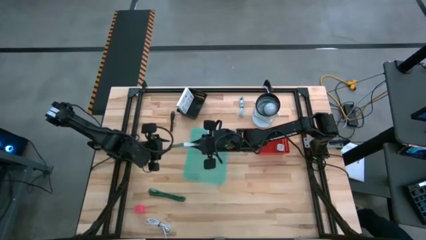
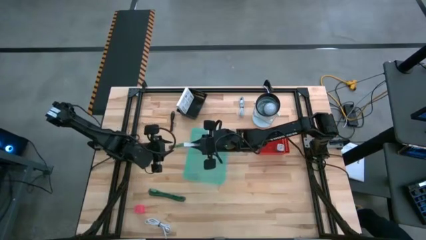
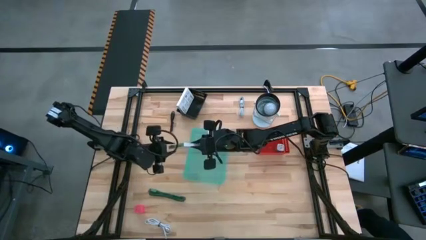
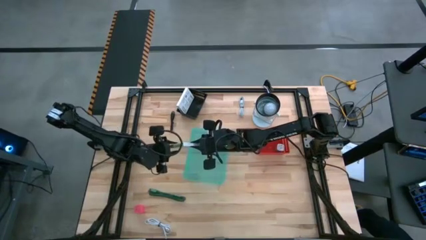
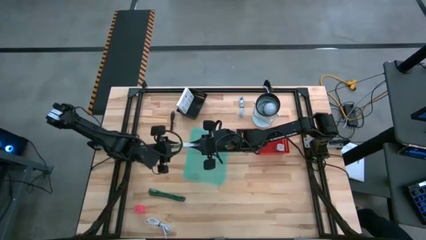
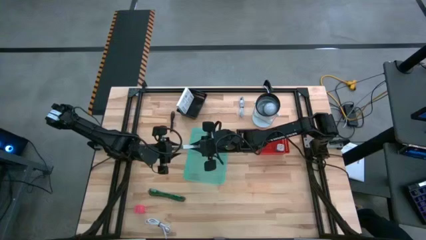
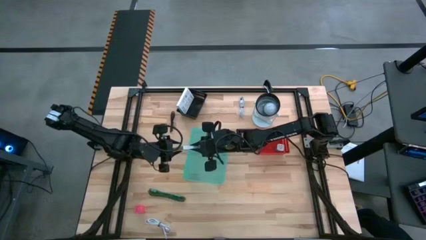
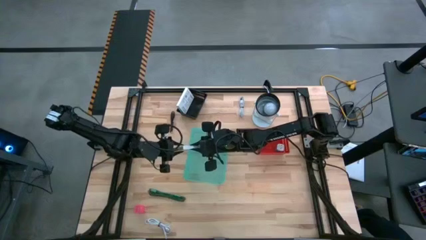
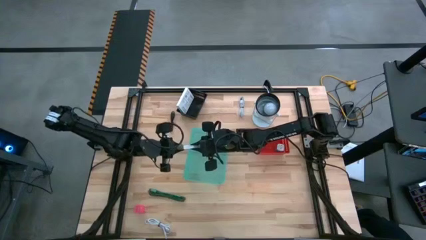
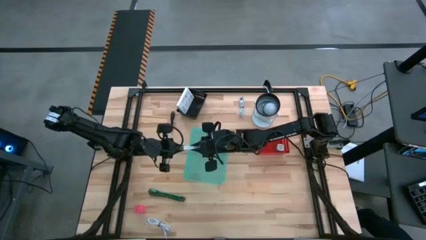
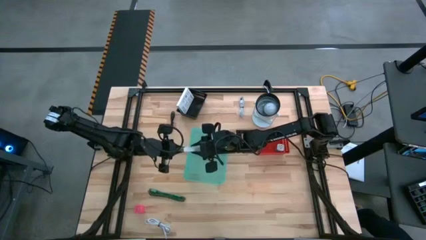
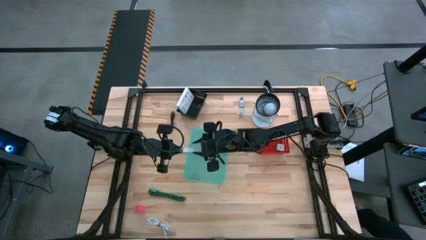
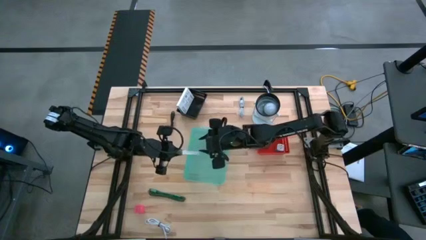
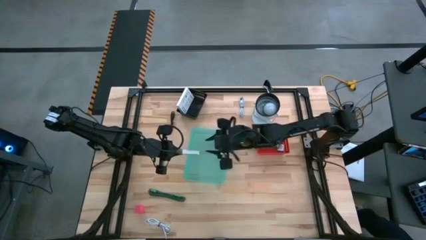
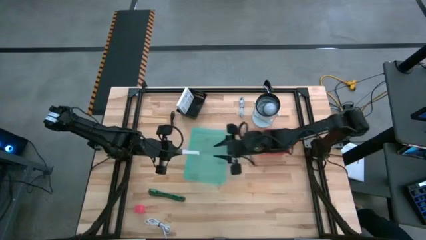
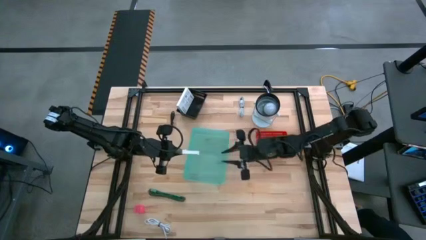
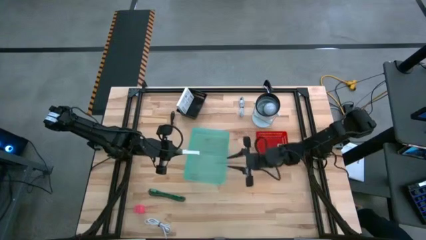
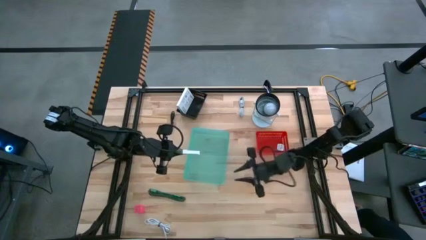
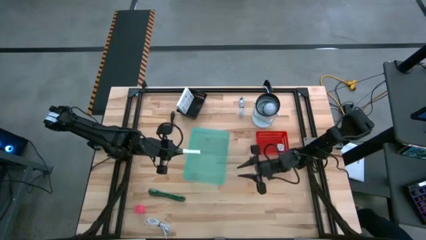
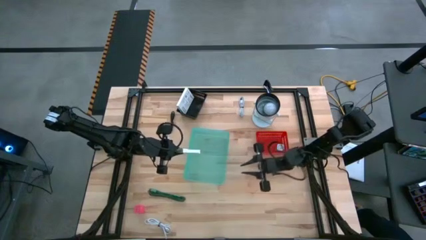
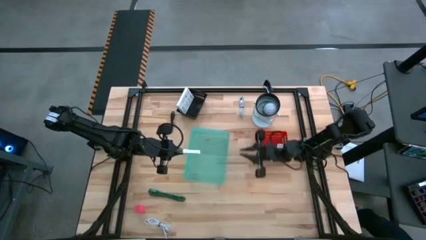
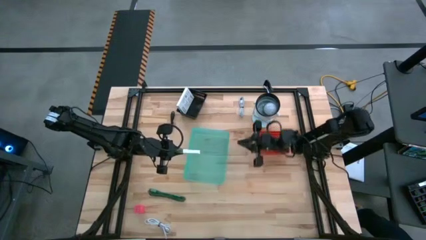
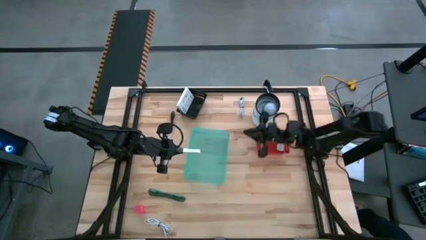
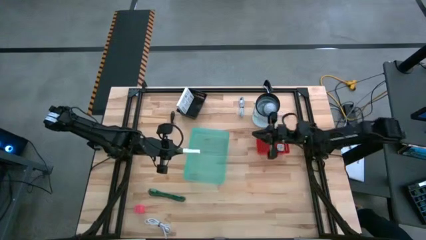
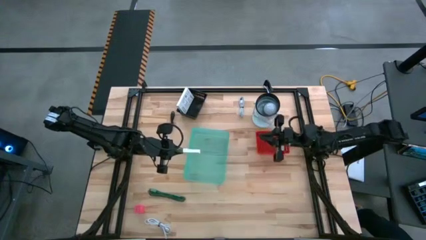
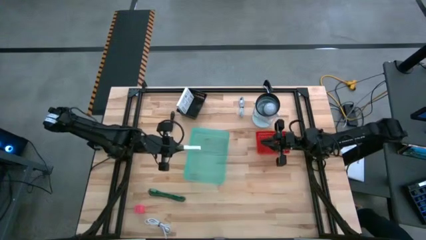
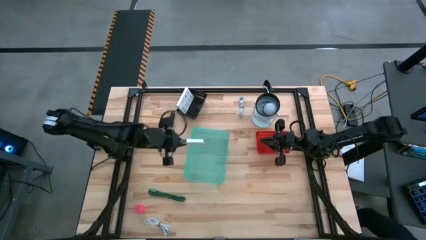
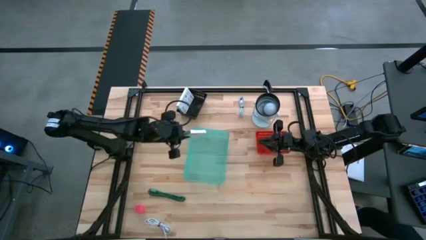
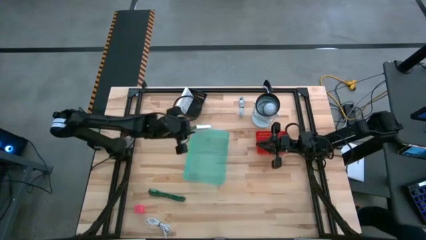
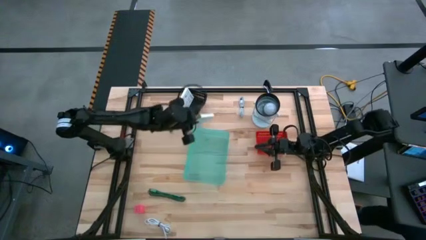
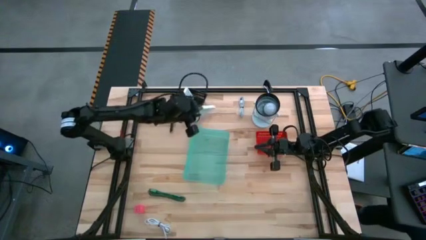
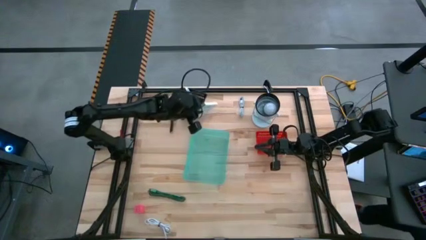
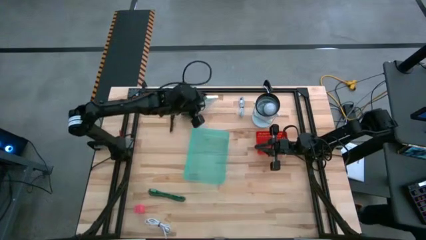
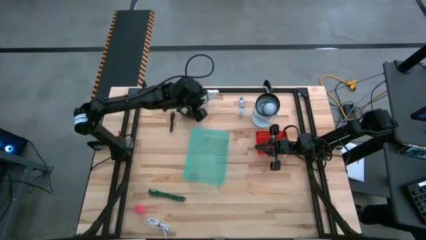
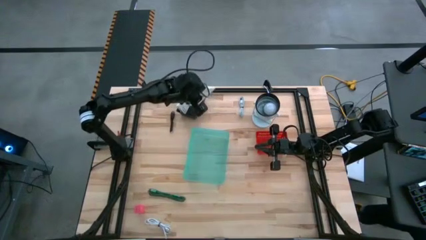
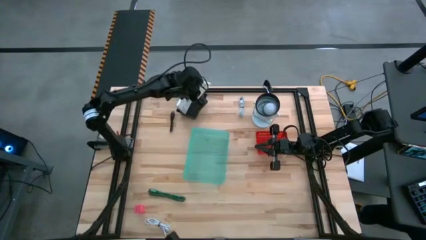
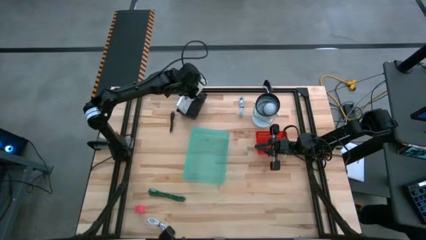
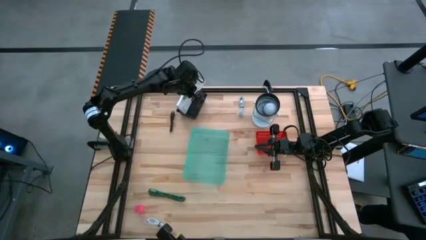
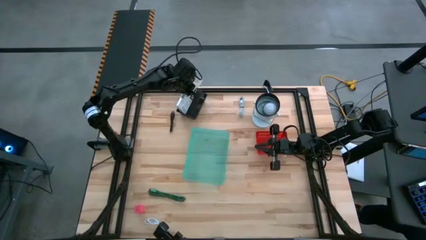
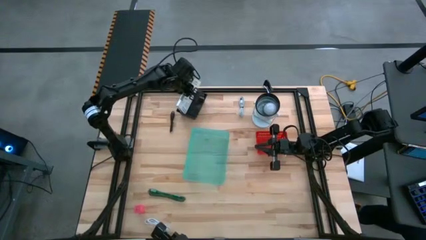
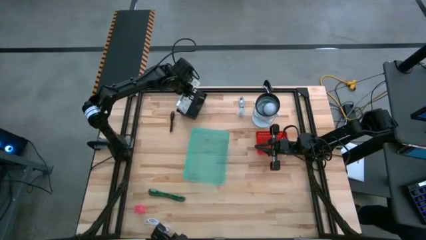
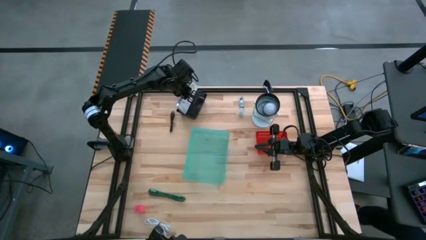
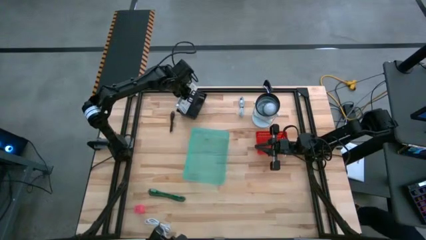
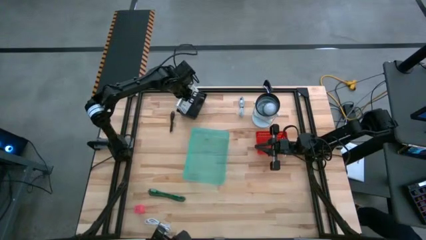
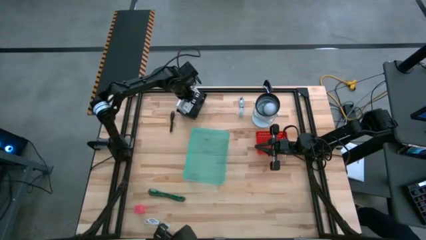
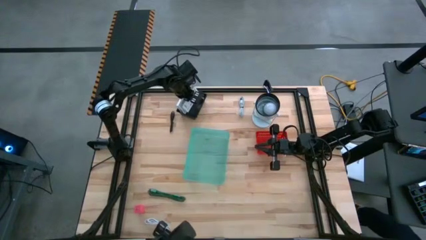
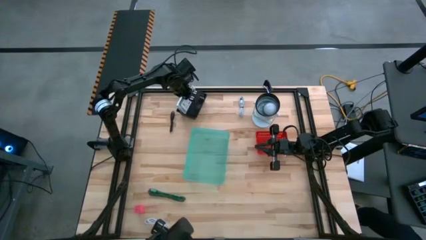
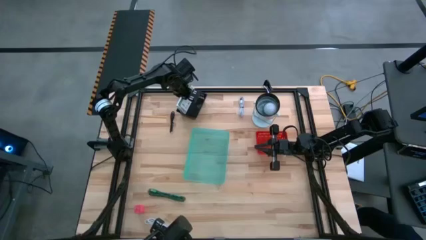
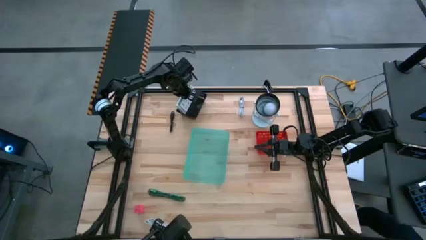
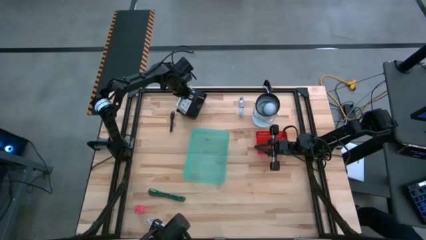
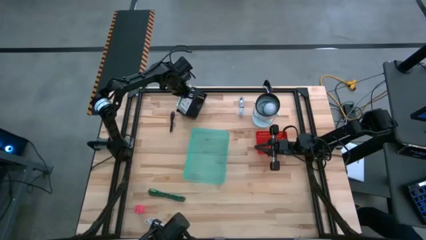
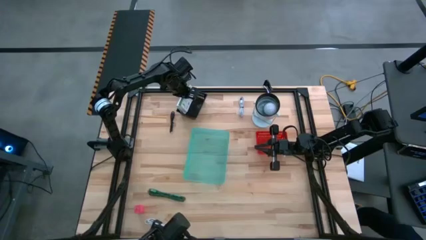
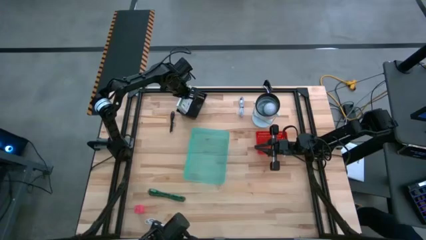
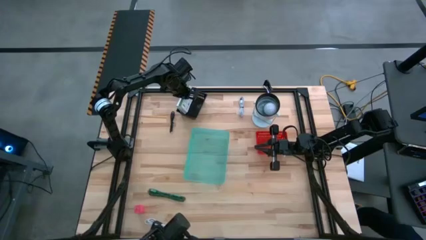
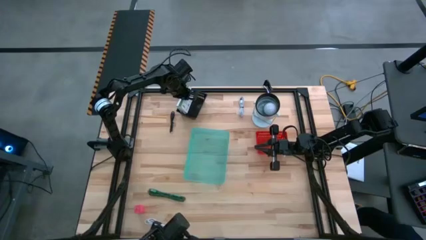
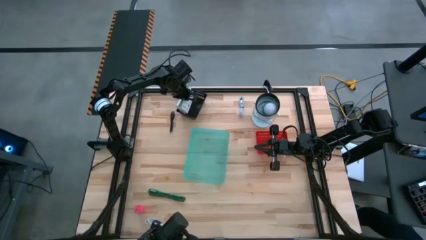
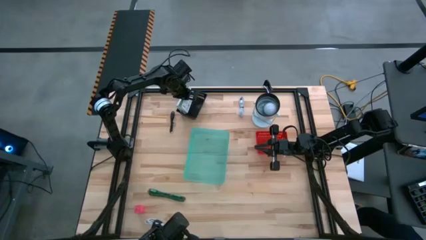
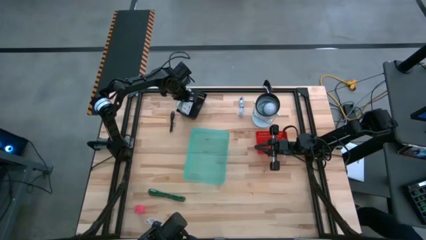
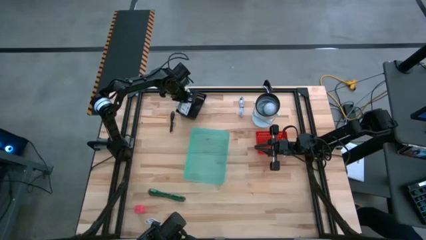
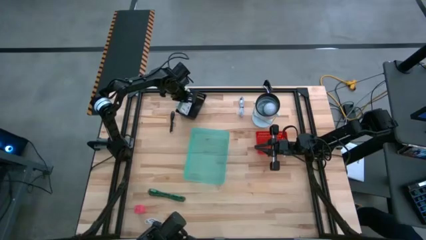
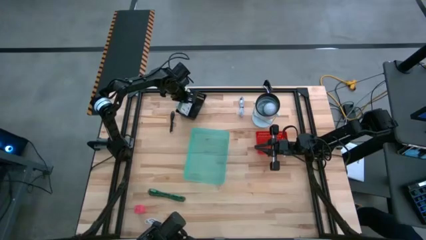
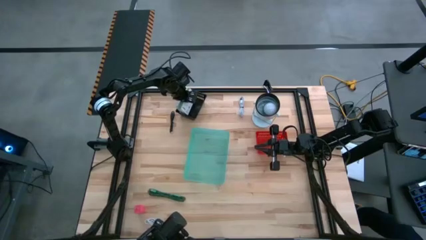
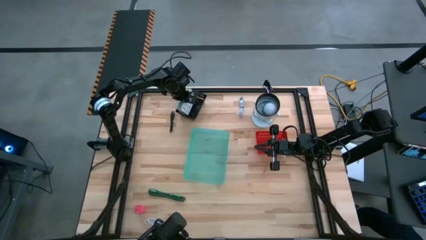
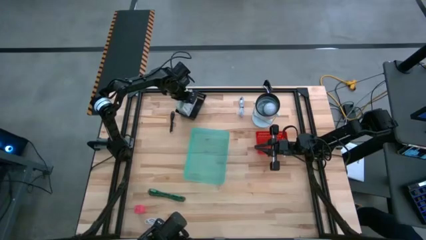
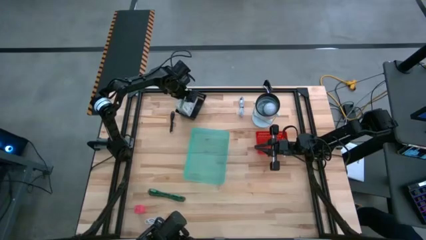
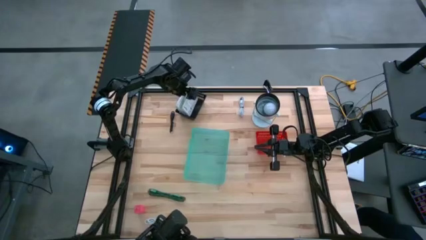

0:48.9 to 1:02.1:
Task: Pick and place items into bin
Put the card reader box into the black basket
